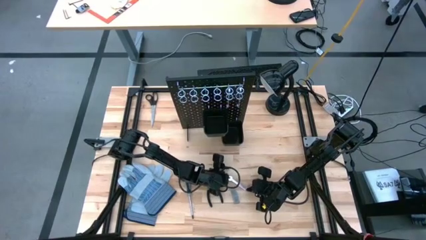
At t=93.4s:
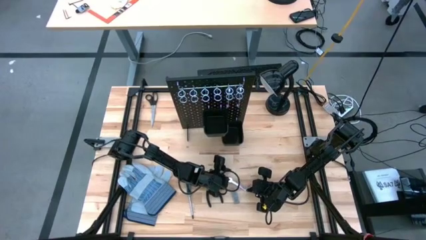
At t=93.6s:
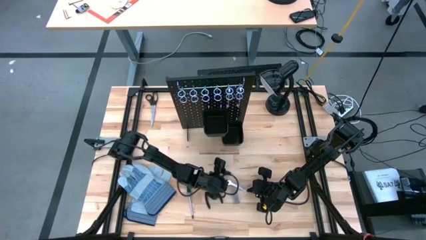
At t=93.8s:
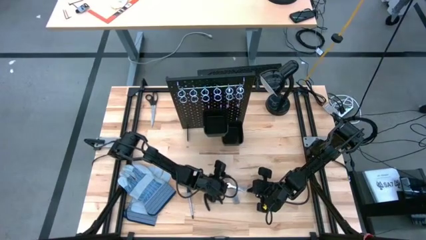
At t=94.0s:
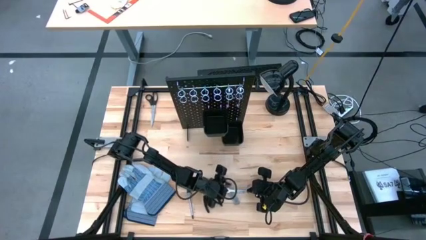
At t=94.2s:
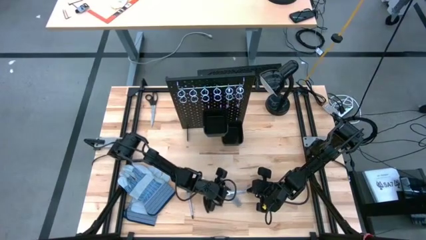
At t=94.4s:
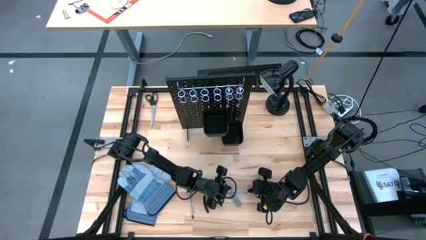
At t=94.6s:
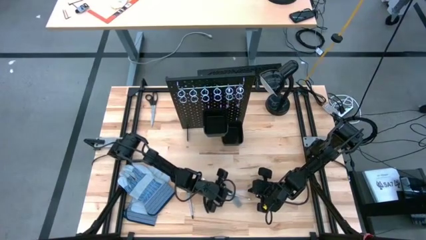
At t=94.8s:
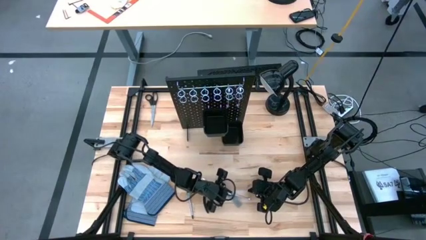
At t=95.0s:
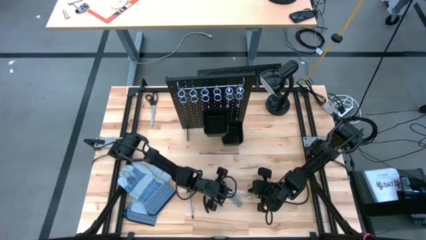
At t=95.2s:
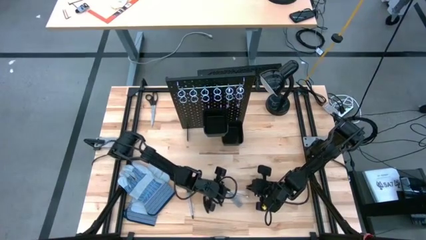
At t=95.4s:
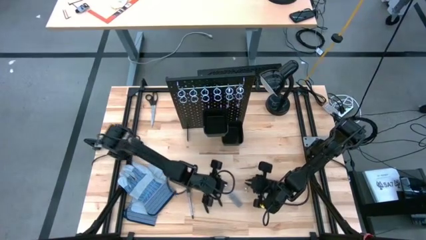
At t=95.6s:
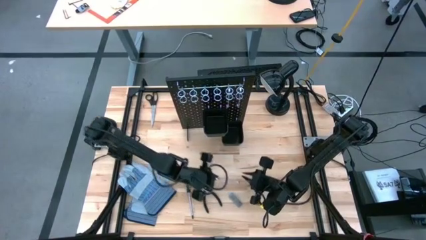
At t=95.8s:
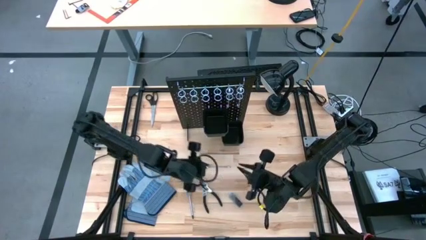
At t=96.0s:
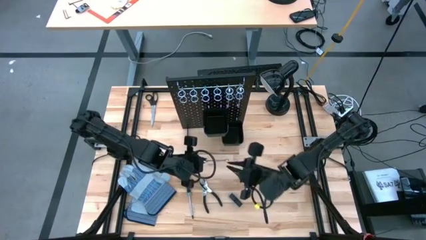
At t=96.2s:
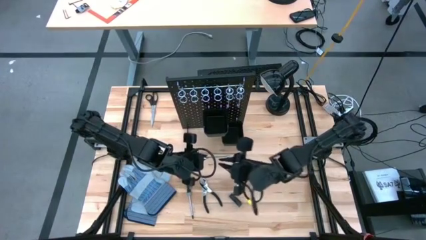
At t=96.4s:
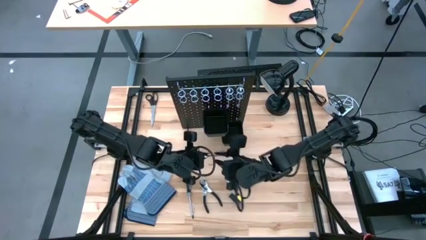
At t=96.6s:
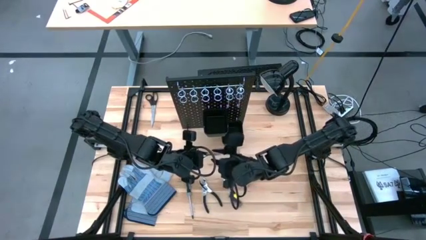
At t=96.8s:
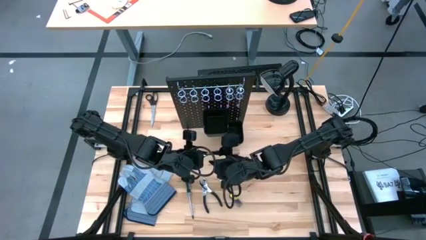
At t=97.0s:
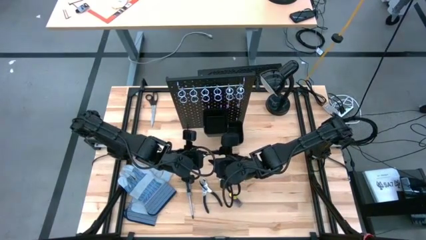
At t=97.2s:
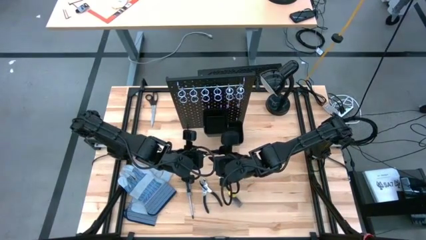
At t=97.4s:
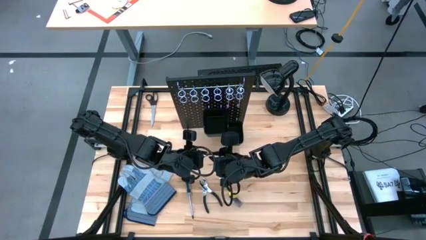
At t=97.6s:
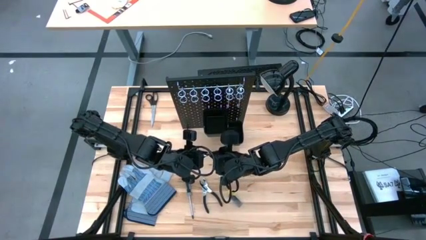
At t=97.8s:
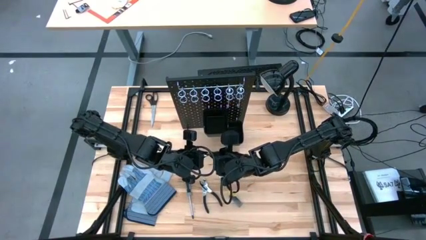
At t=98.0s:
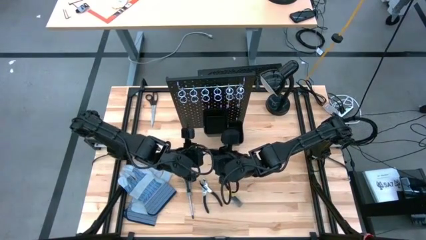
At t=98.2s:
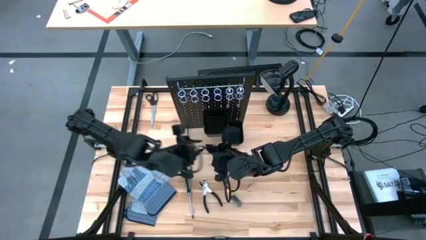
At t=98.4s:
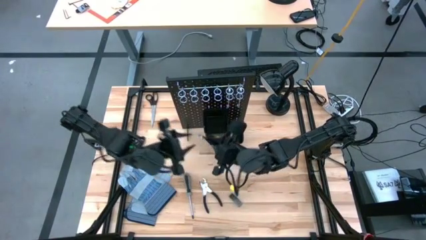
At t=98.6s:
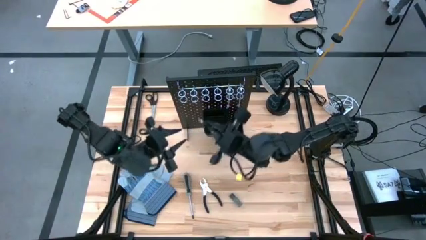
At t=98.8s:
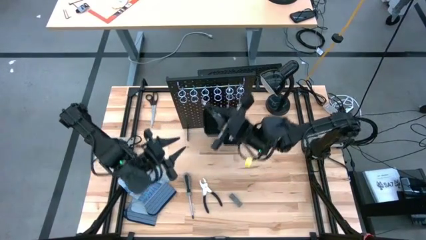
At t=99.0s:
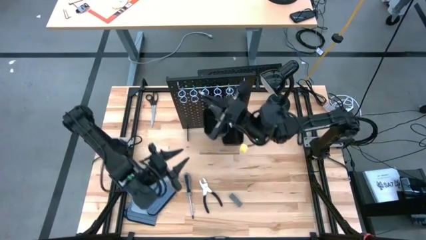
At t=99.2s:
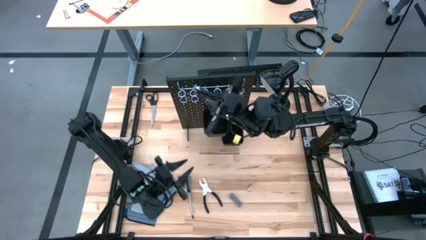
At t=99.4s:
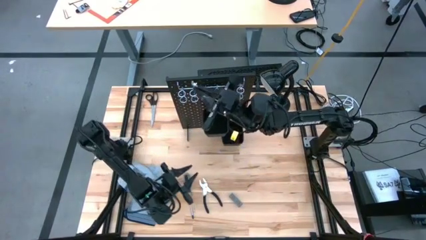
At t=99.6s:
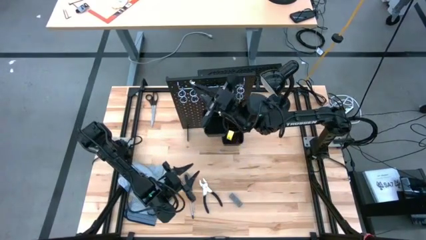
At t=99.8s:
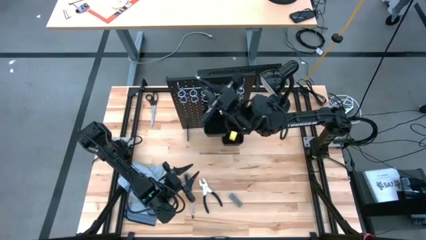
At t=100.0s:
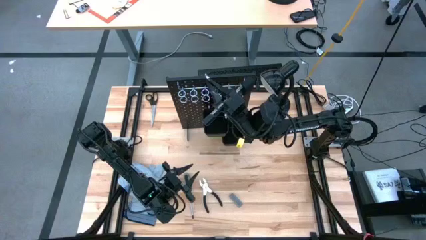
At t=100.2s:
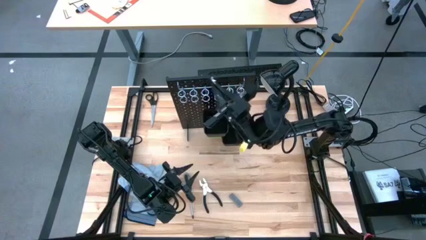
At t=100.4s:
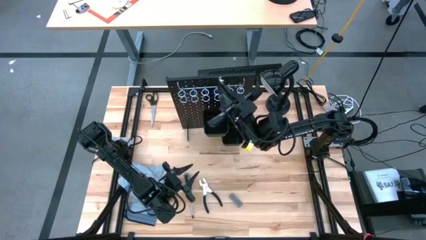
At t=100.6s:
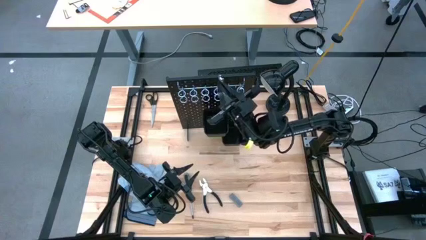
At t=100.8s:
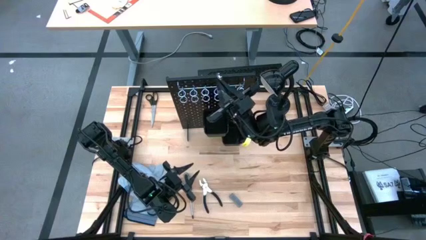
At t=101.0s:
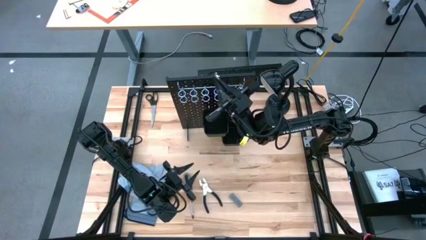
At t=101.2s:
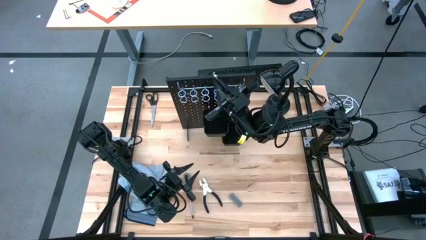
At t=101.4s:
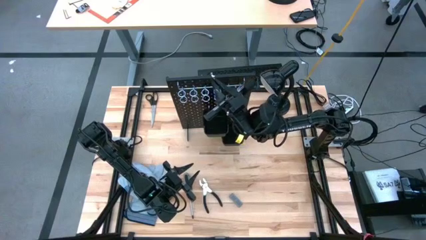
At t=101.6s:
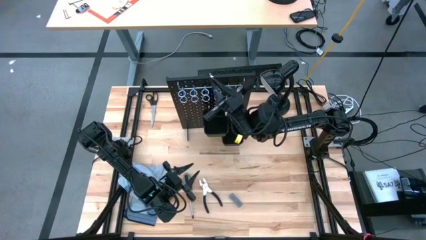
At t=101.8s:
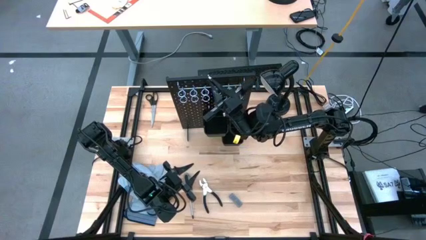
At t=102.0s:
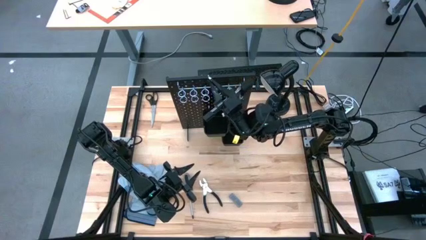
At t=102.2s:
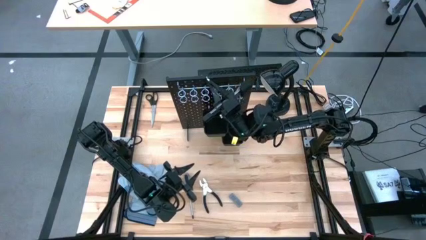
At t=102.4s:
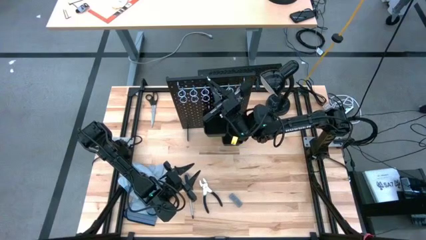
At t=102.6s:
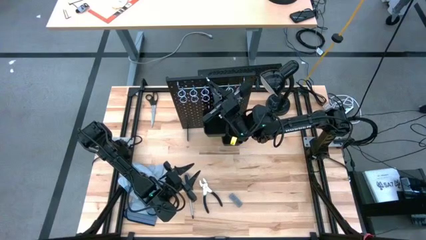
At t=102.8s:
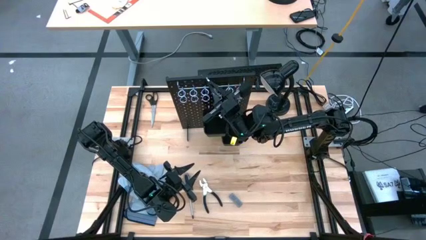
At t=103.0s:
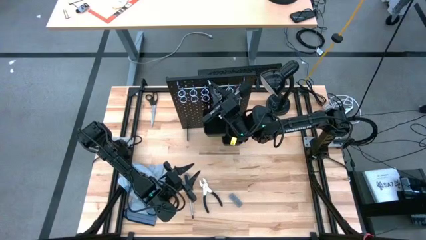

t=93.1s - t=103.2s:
Task: Hang tools onto peg board
Hang the silver wrench on the black pegboard

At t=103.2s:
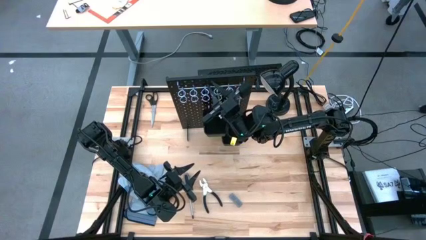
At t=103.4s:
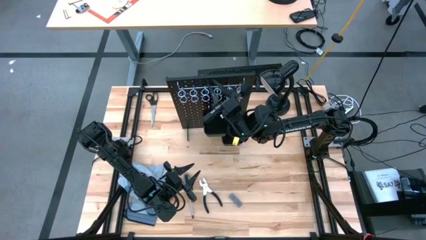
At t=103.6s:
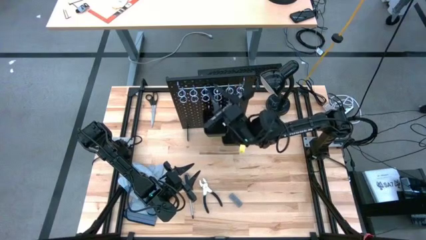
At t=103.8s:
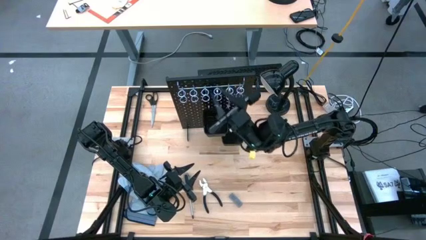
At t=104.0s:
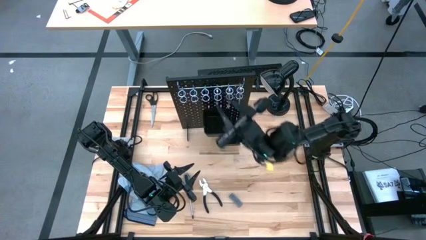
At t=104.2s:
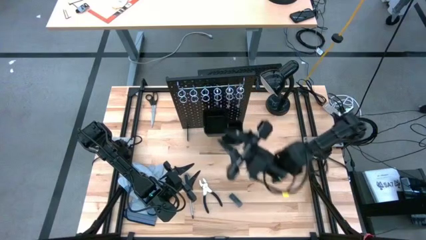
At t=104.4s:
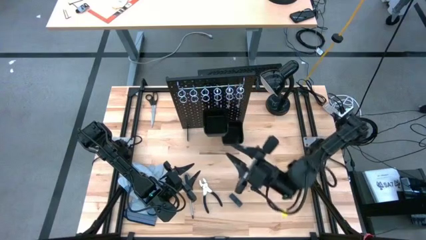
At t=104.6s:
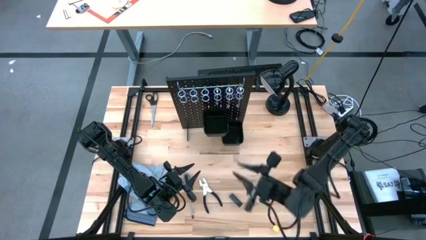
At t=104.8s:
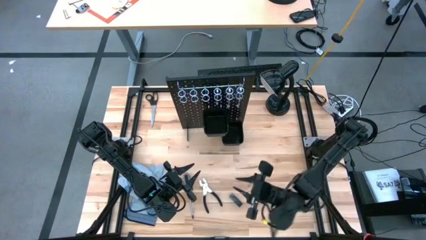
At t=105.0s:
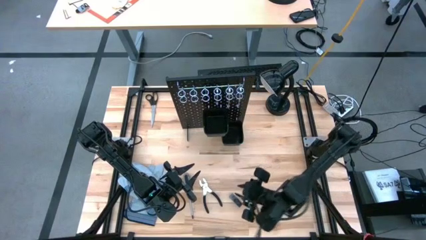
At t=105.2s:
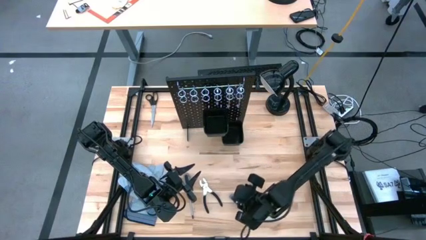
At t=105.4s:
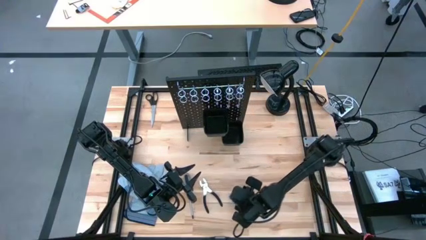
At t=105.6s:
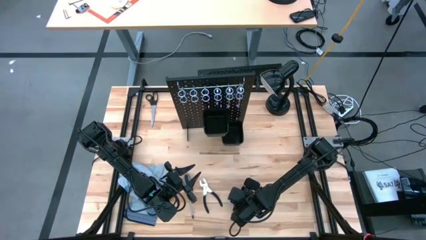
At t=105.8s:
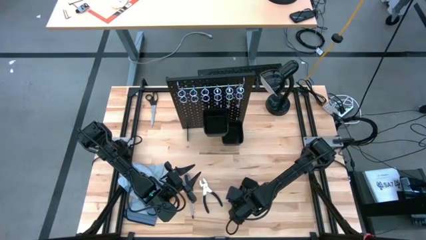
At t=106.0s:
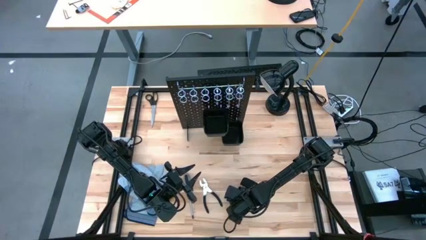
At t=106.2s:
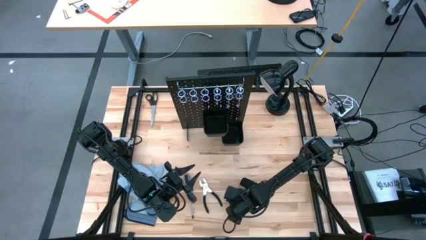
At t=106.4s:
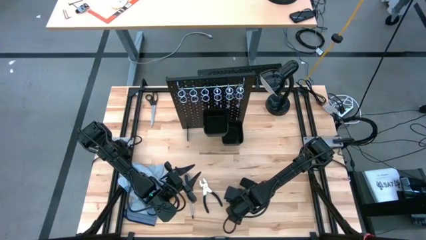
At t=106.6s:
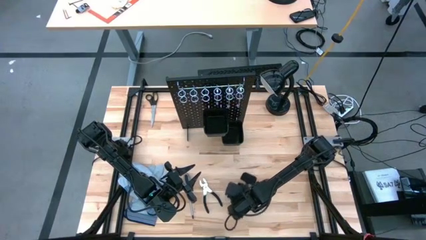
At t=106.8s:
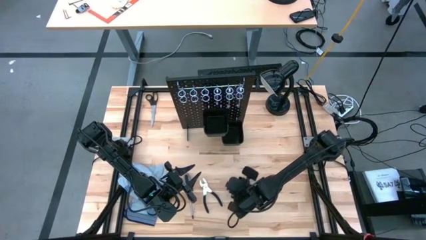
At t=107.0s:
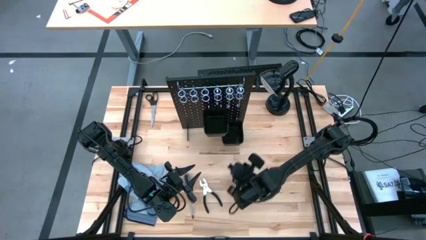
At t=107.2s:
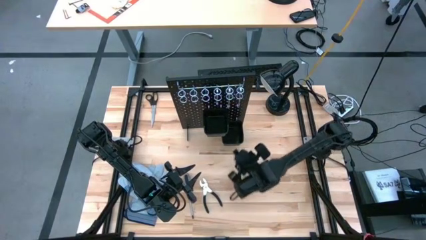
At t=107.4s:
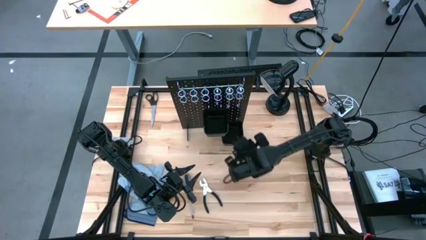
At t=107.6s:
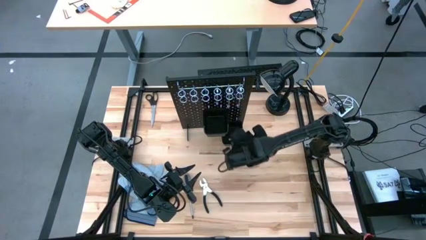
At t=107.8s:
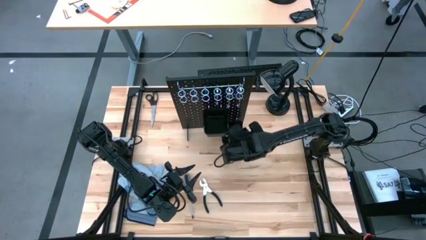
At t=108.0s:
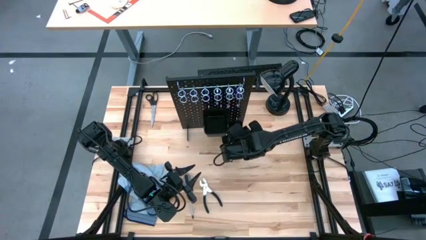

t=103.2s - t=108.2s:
Put the black utility knife blades into the bottom black bin of the black pegboard
